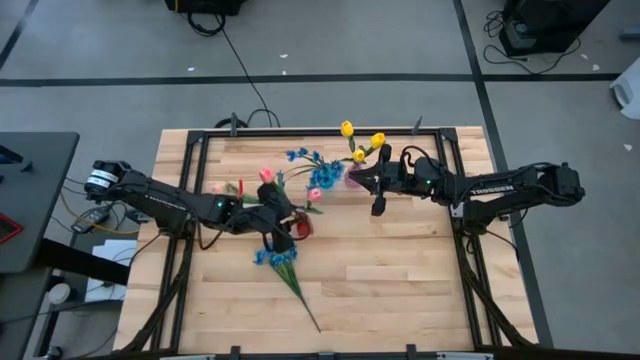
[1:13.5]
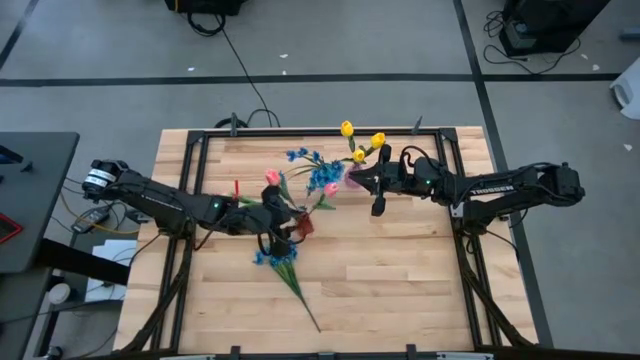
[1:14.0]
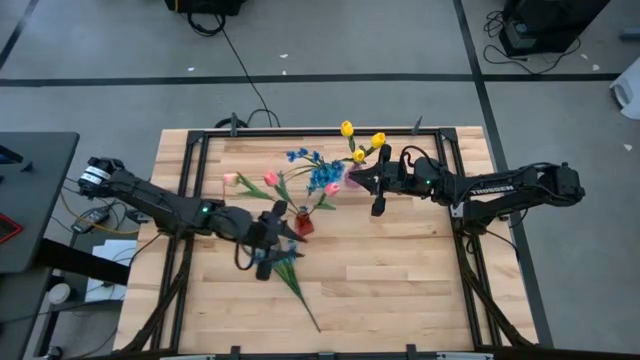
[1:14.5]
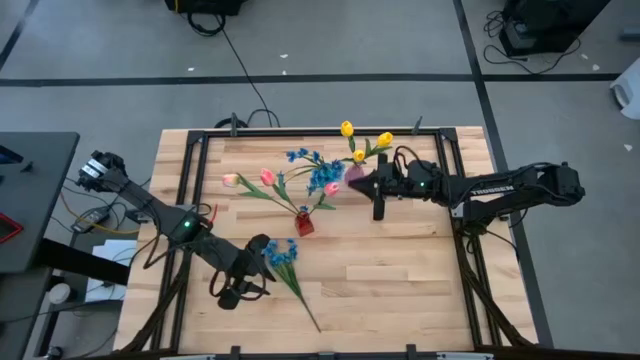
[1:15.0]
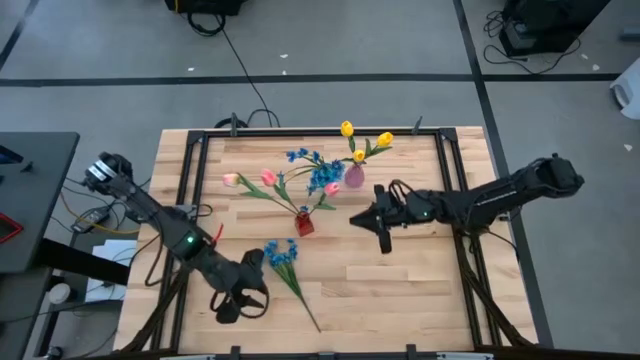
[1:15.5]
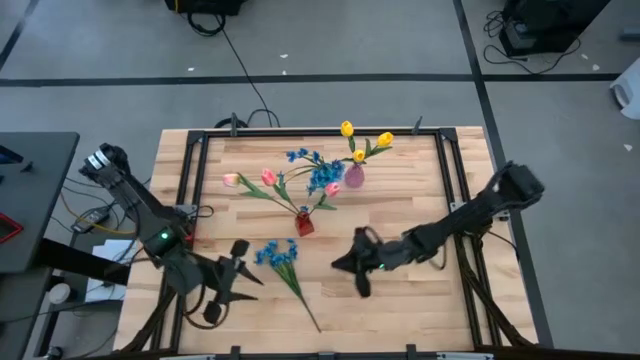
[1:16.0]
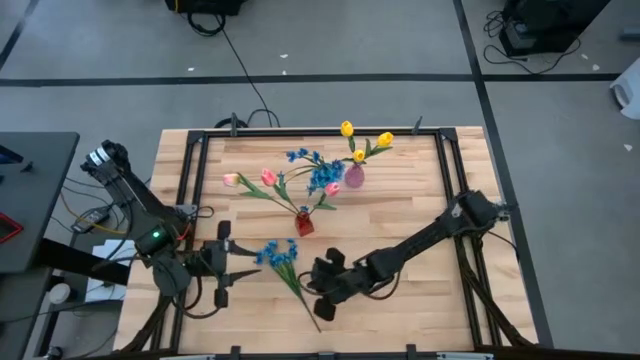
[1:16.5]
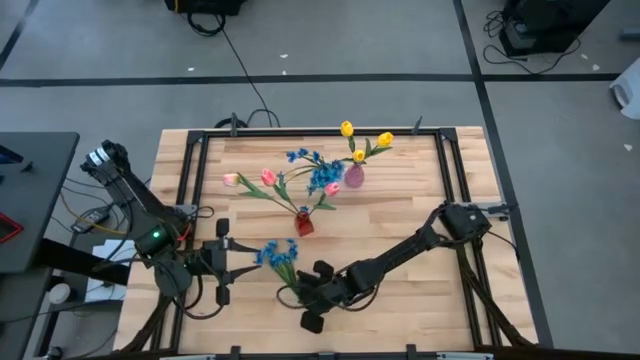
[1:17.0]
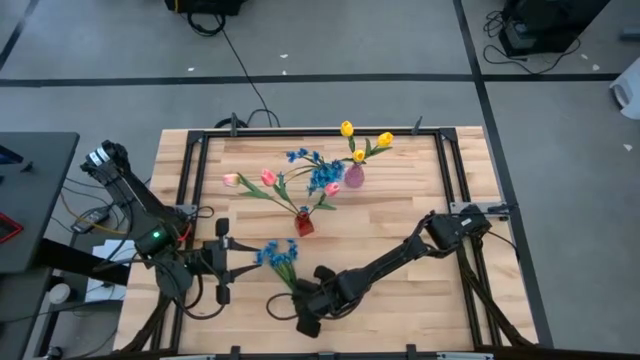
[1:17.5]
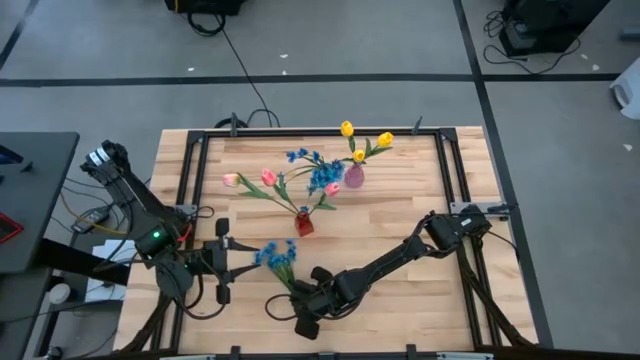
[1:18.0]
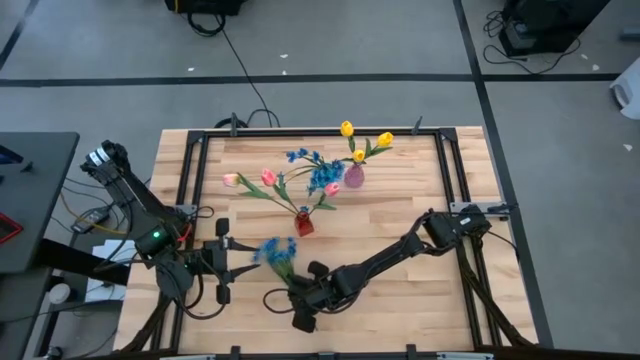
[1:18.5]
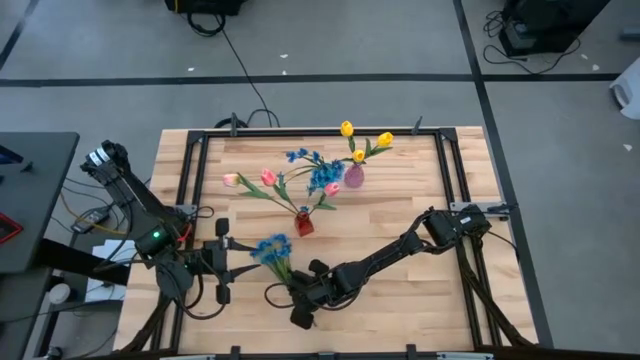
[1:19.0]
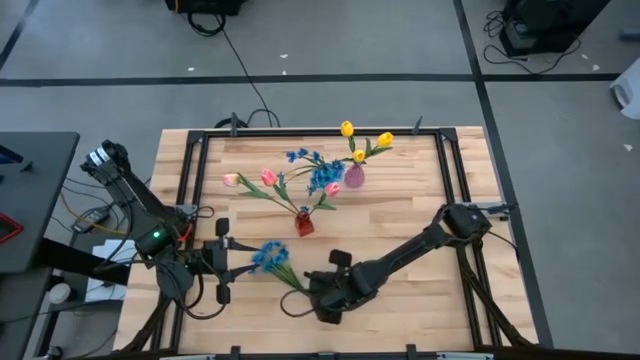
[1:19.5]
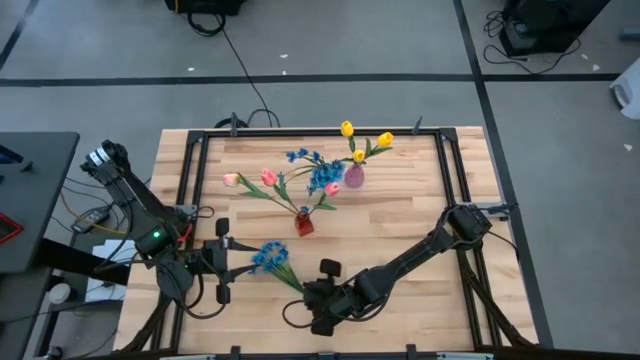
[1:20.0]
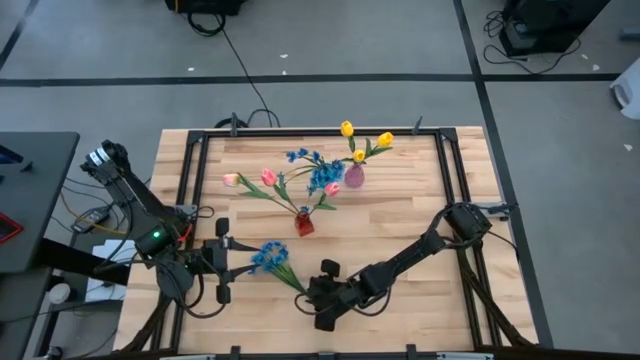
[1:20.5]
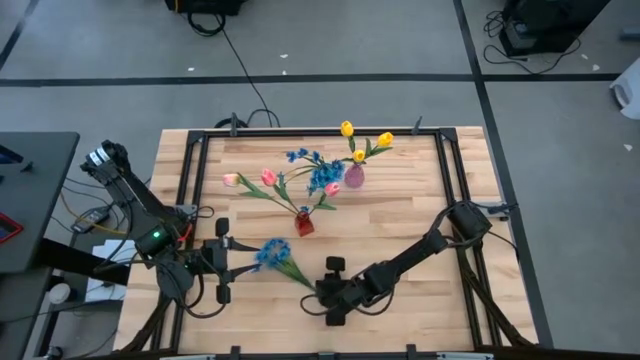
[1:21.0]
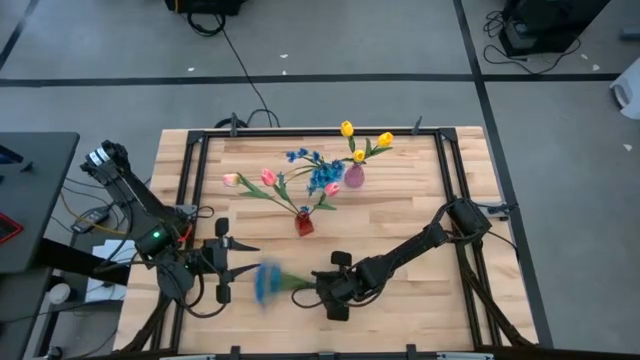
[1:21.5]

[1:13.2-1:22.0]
Task: Sort flowers into vase by color
Put the blue bouquet into the blue vase

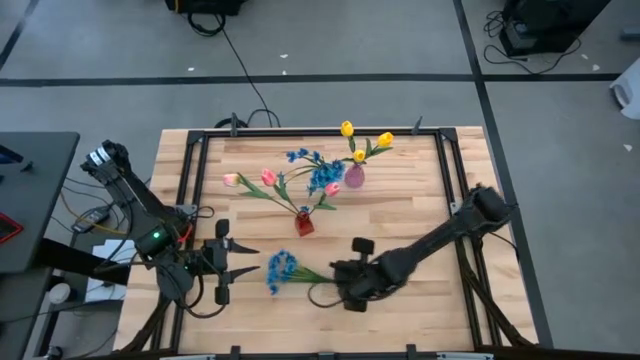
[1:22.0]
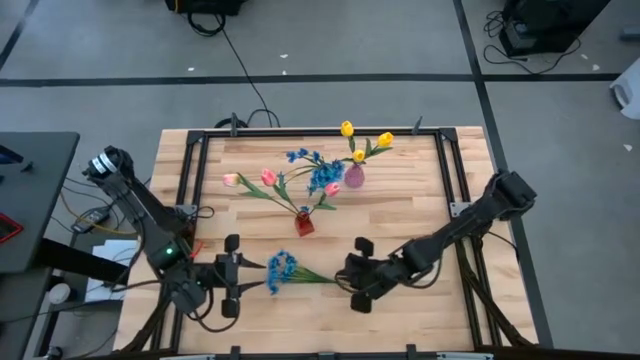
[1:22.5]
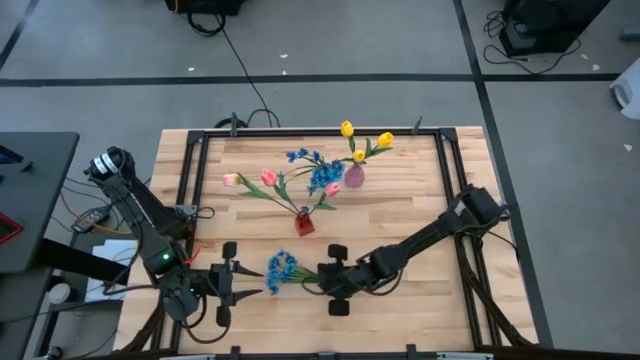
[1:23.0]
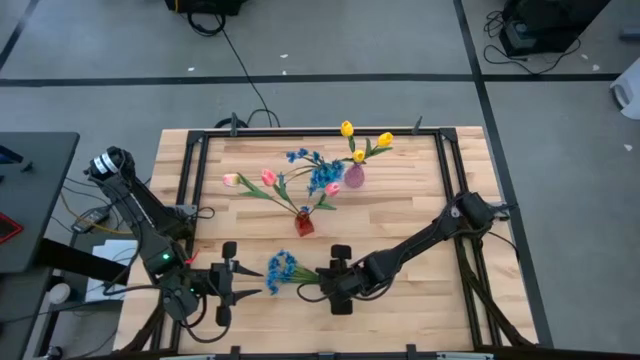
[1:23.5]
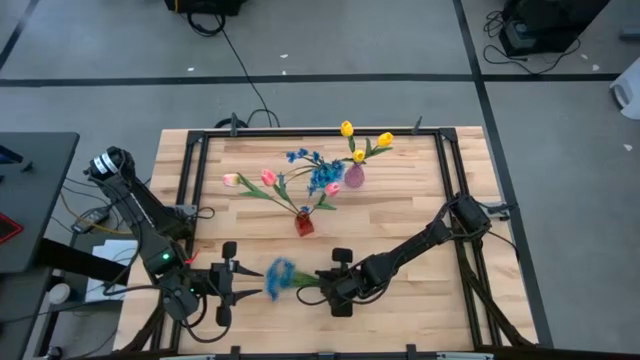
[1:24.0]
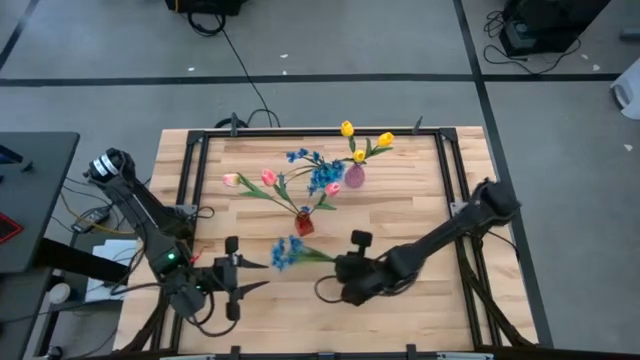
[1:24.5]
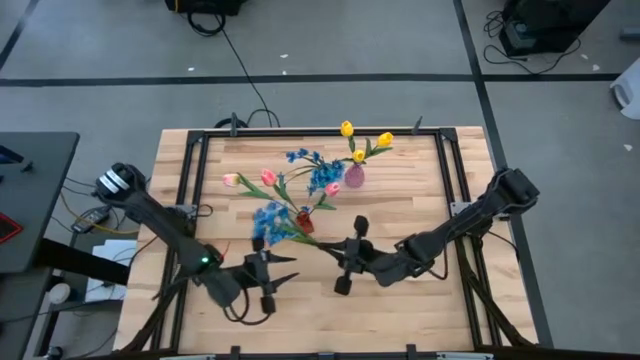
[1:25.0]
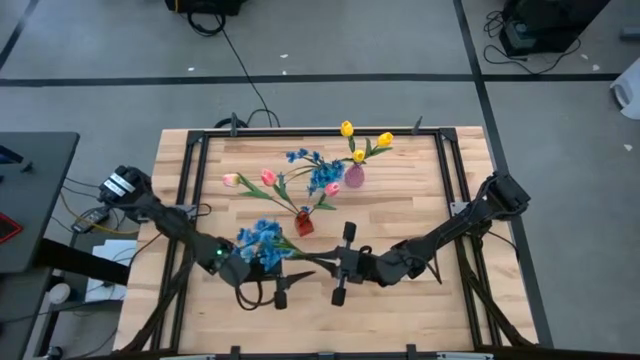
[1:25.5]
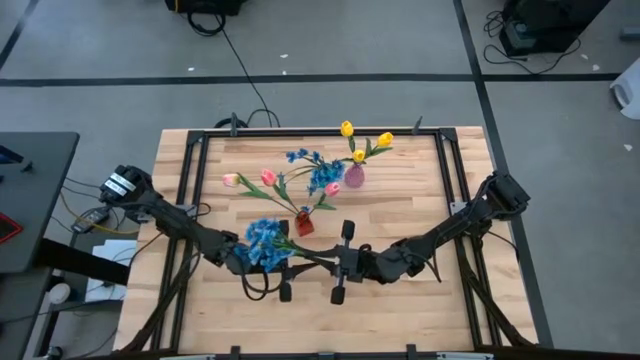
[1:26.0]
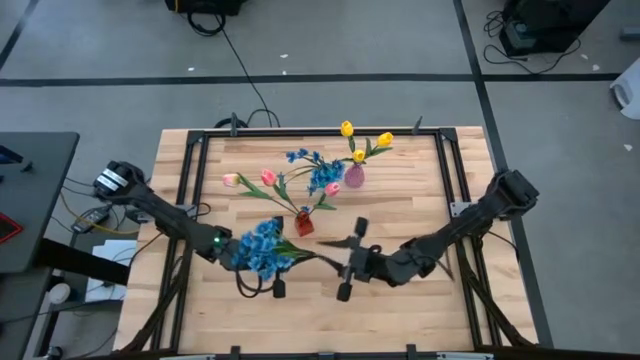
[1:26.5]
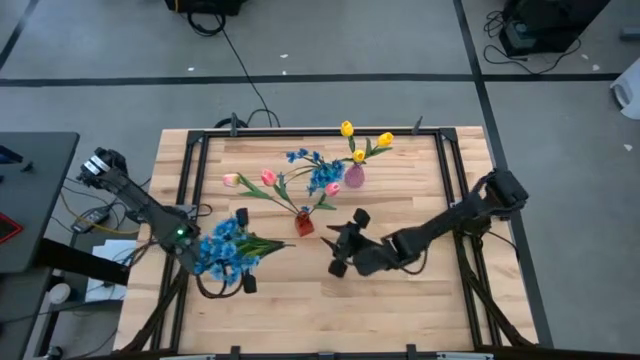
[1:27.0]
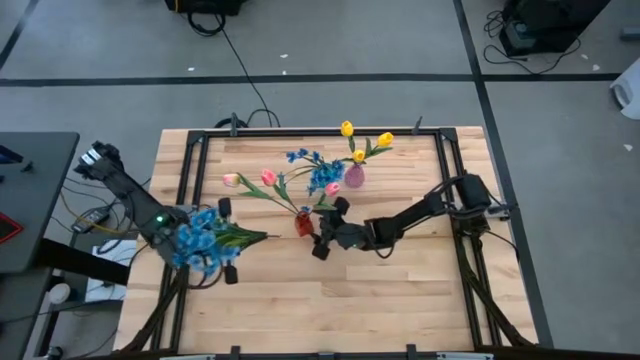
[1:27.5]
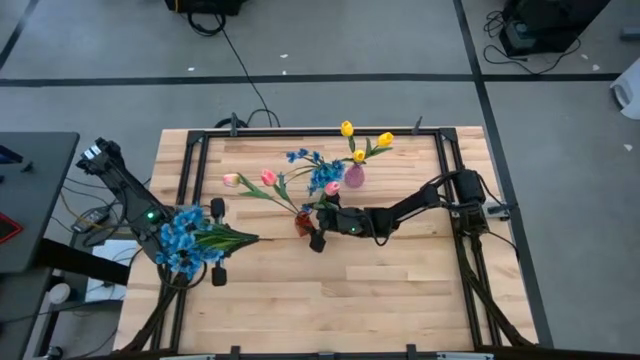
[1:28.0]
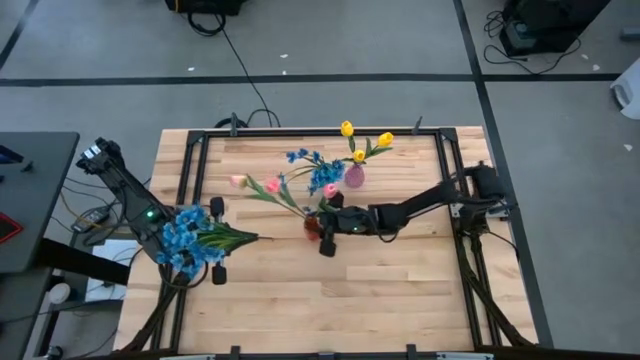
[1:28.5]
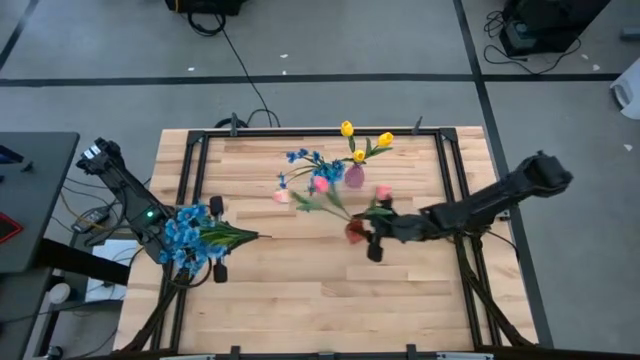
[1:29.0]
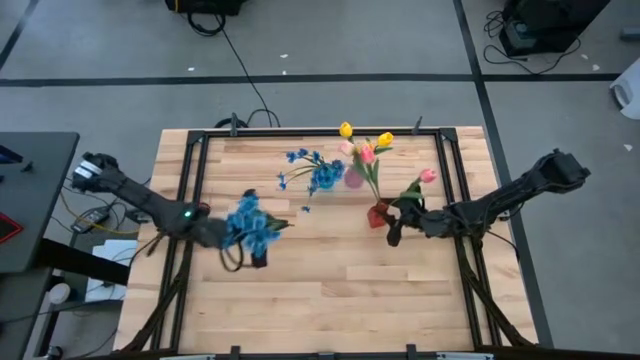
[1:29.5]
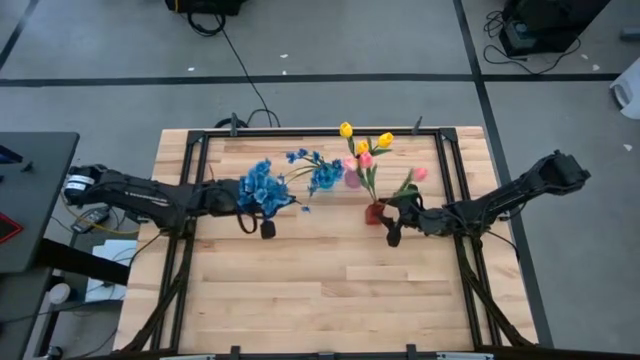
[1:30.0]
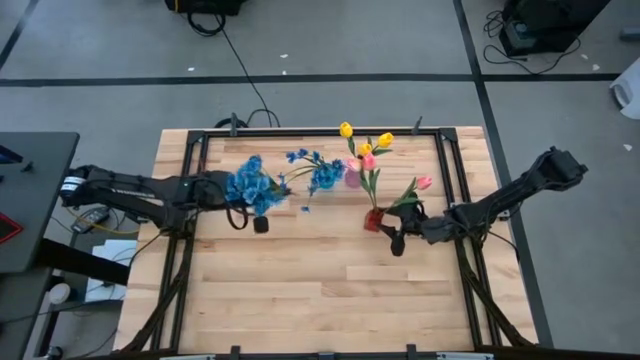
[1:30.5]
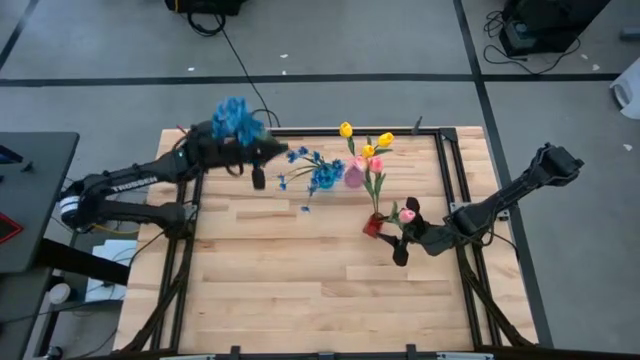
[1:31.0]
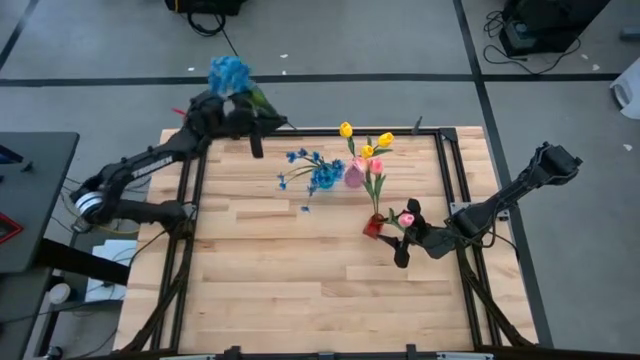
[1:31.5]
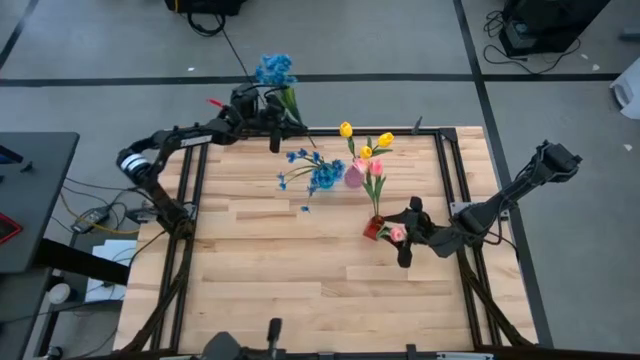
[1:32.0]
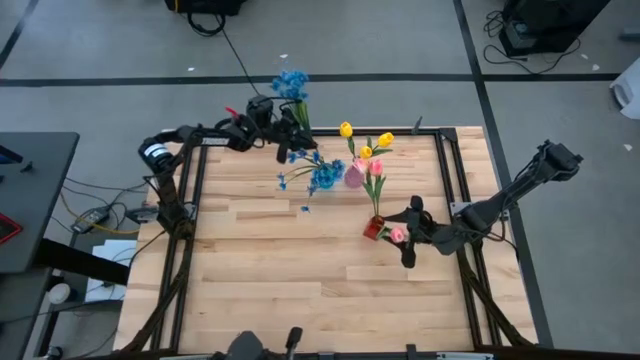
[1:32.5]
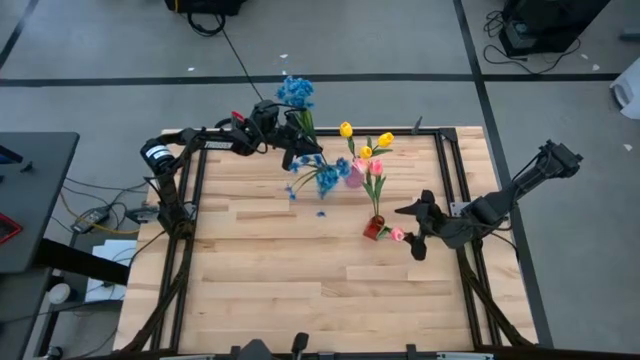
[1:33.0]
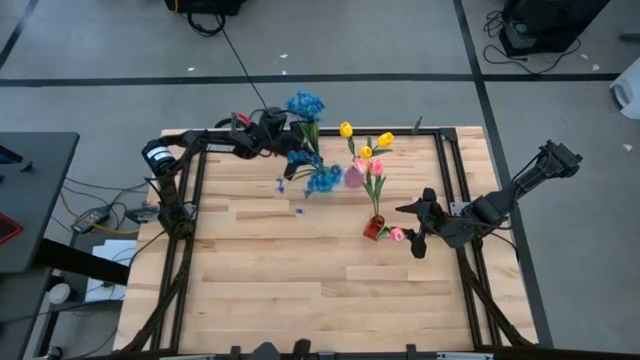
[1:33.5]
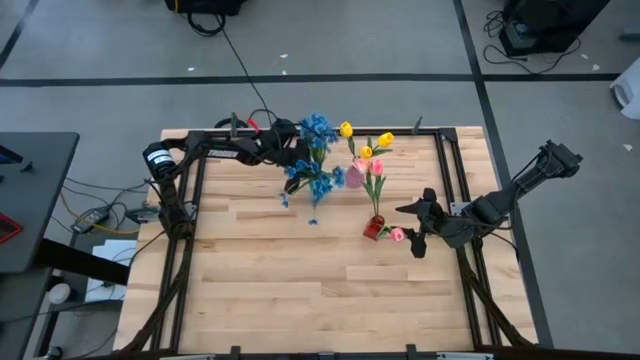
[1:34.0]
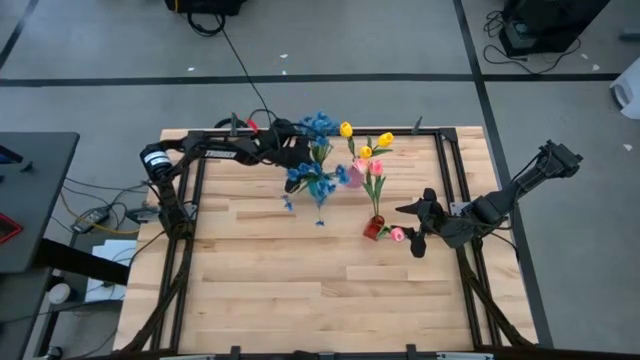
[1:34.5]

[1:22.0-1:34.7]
Put the blue bouquet into the blue vase
